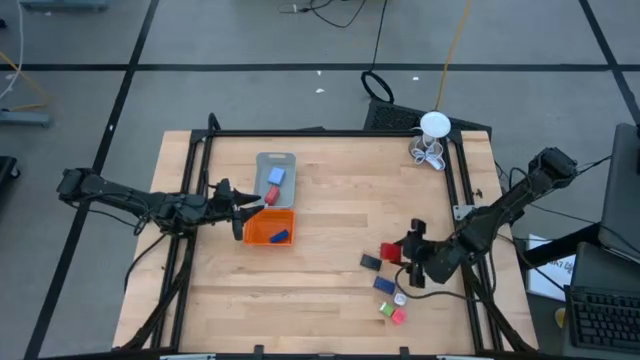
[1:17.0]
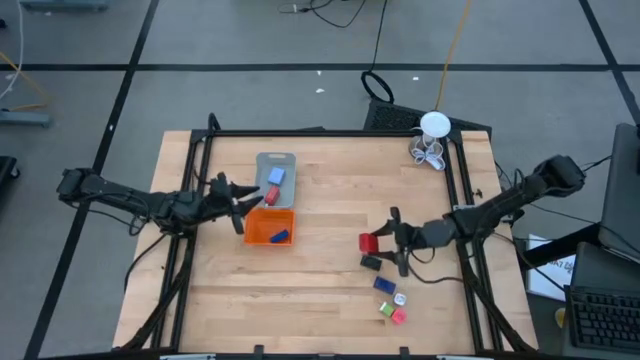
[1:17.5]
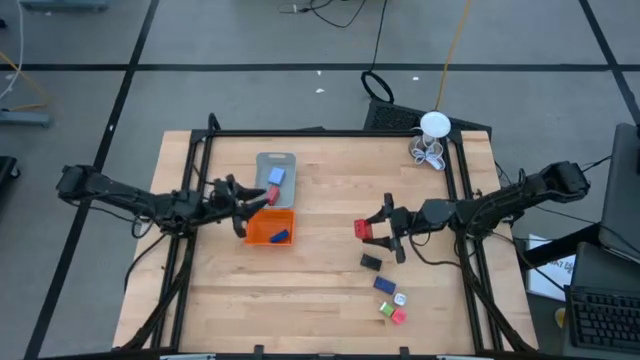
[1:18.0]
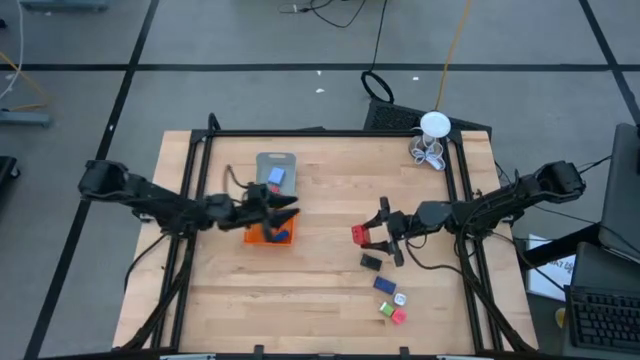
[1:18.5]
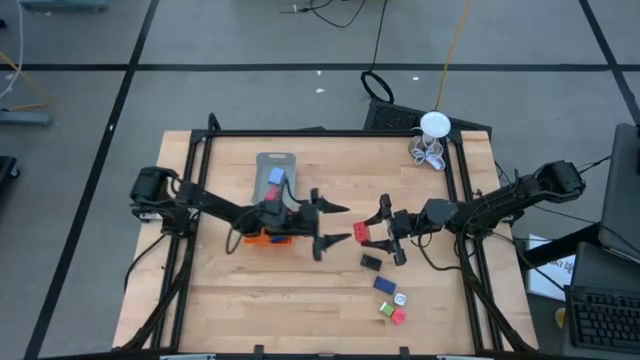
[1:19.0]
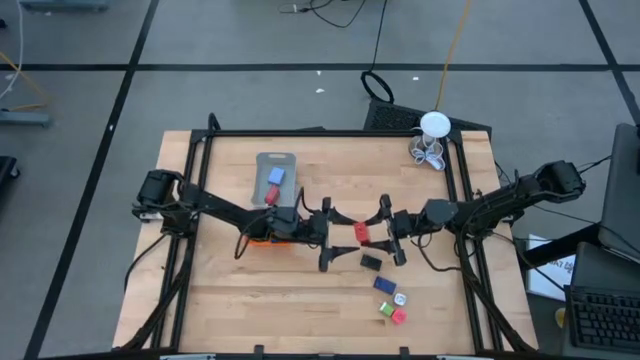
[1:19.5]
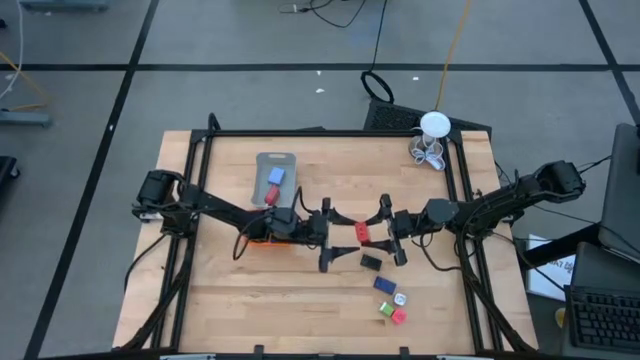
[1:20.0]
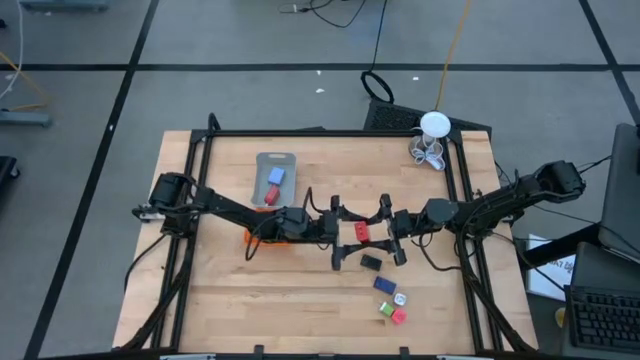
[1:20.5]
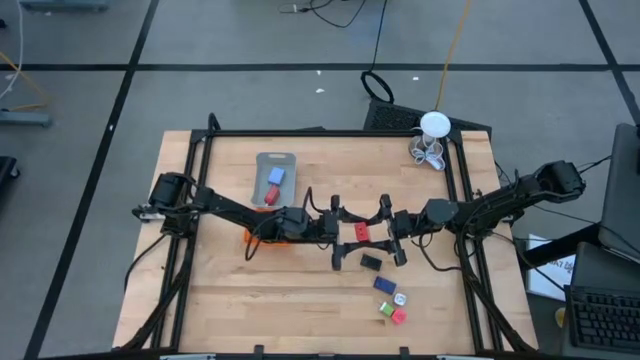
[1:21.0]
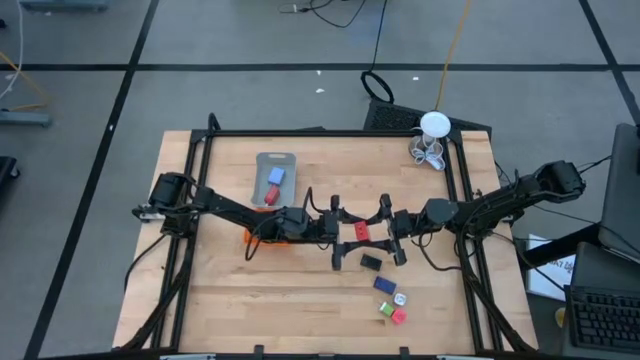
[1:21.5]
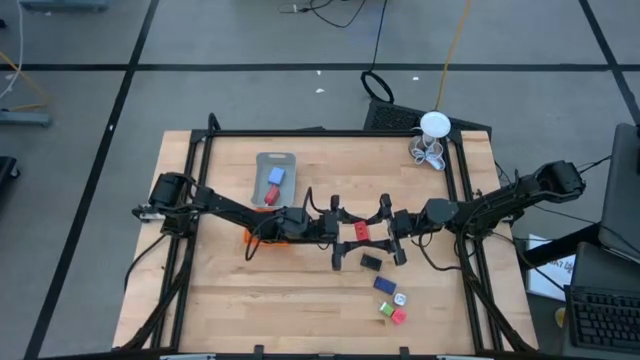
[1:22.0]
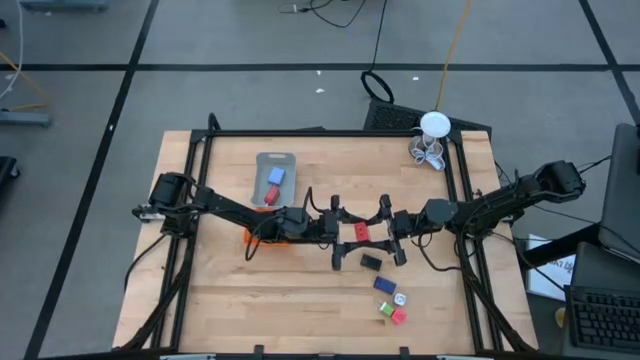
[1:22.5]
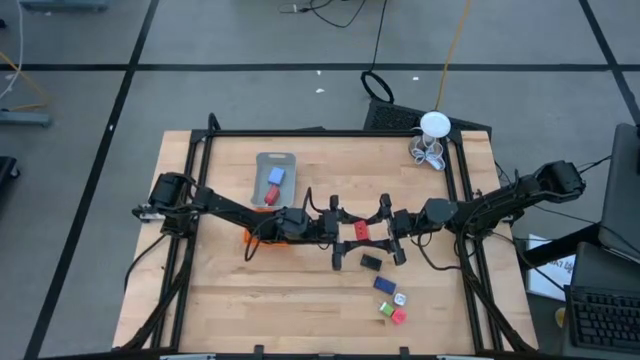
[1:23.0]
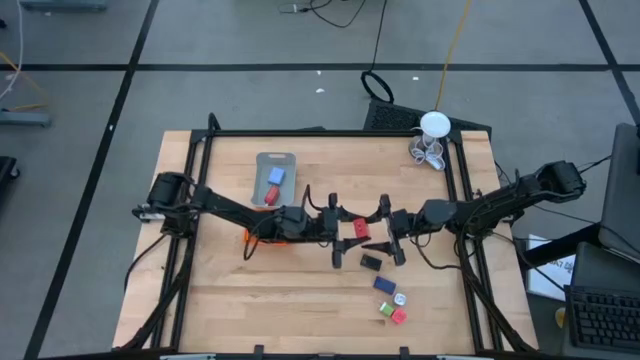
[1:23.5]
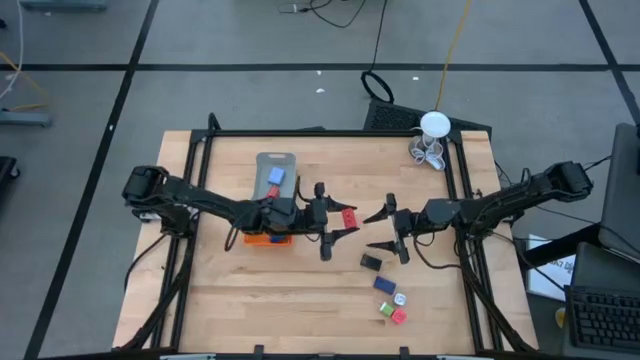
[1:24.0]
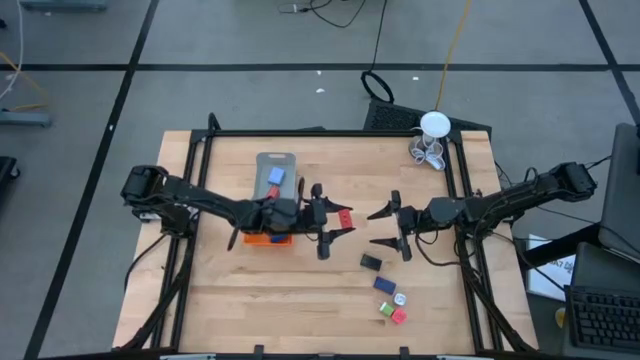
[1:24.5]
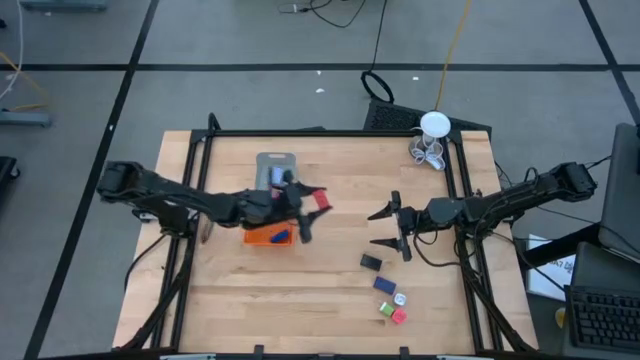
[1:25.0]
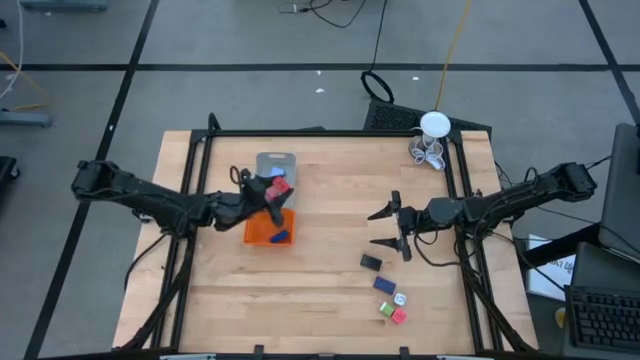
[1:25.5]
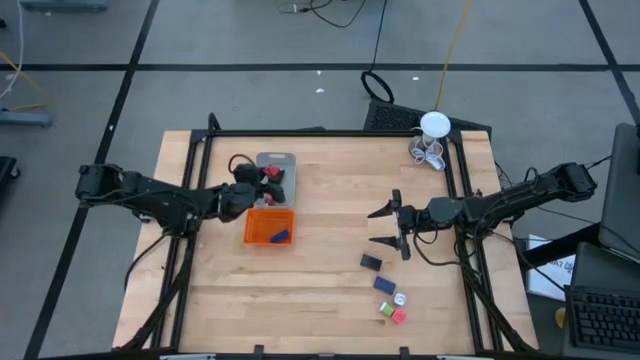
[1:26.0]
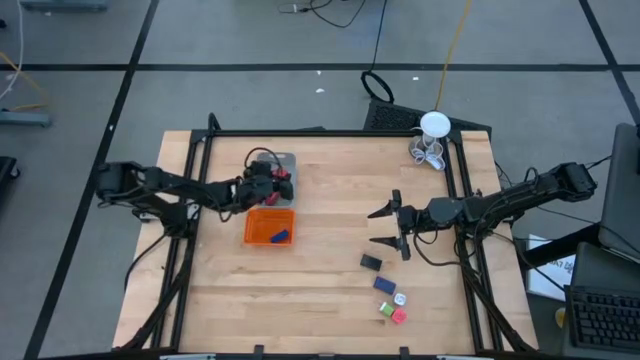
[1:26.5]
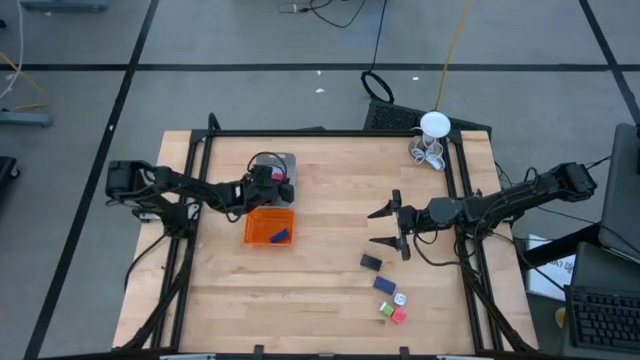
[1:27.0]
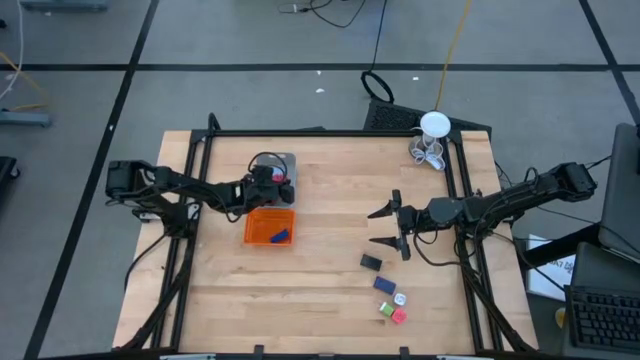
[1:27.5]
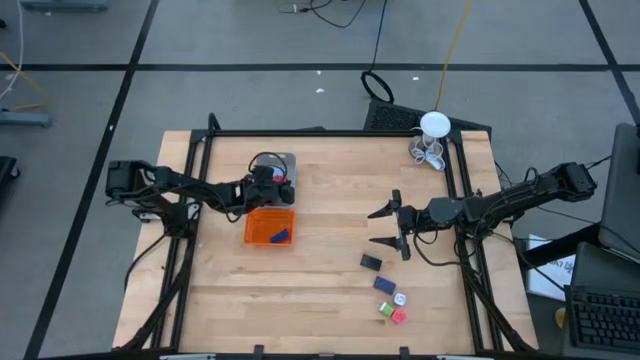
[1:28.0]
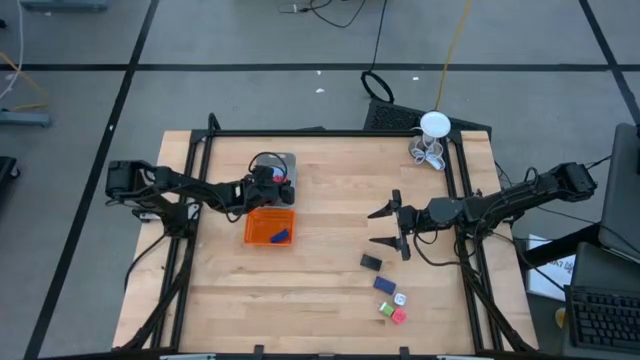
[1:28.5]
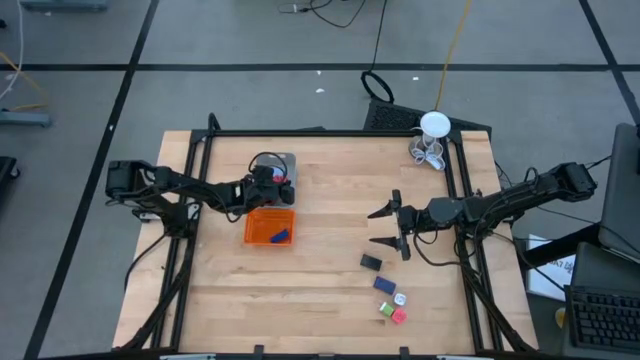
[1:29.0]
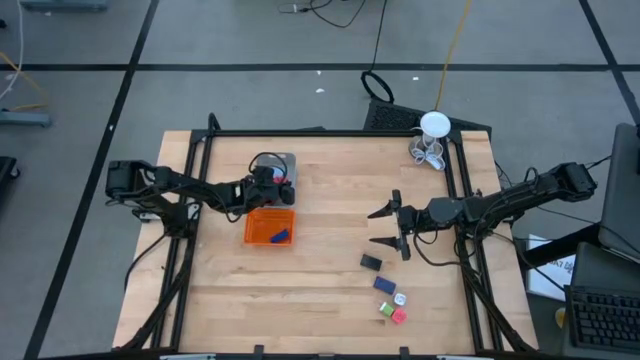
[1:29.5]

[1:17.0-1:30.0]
Task: Pick & Place Office items
Put the red charger adapter into the gray bin
